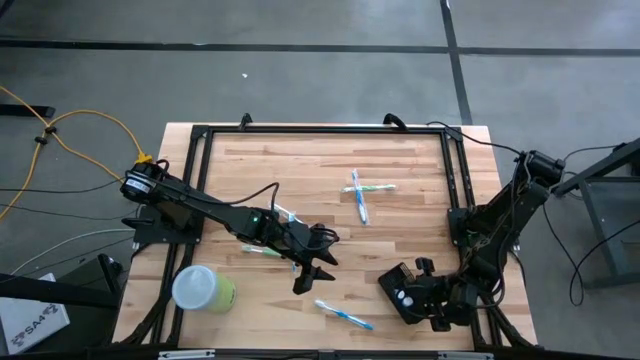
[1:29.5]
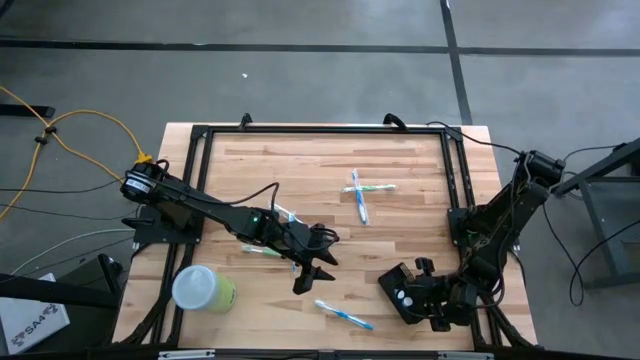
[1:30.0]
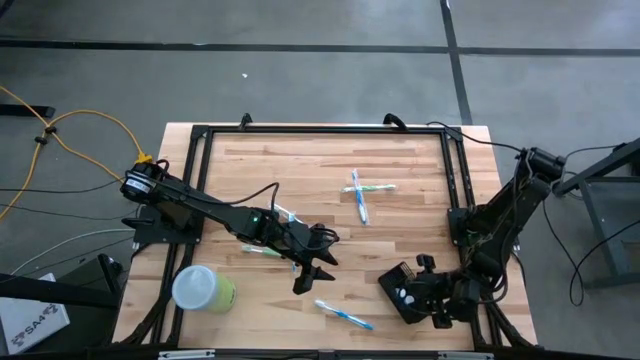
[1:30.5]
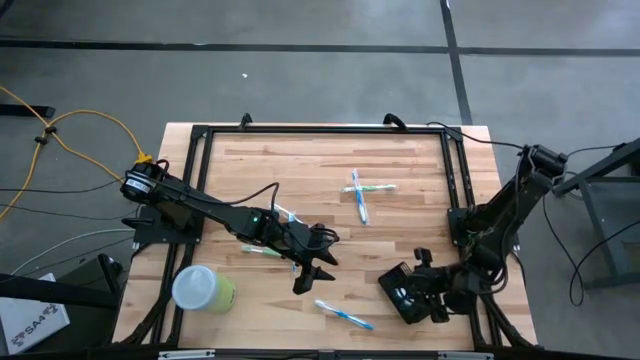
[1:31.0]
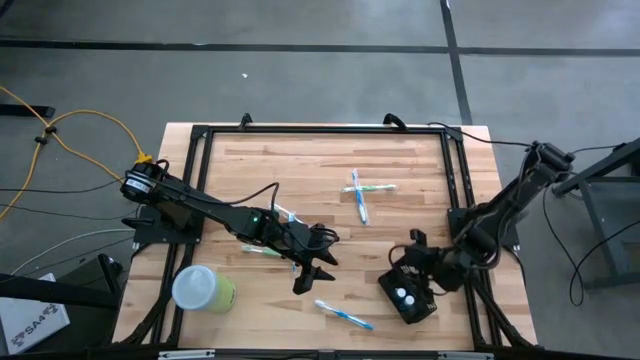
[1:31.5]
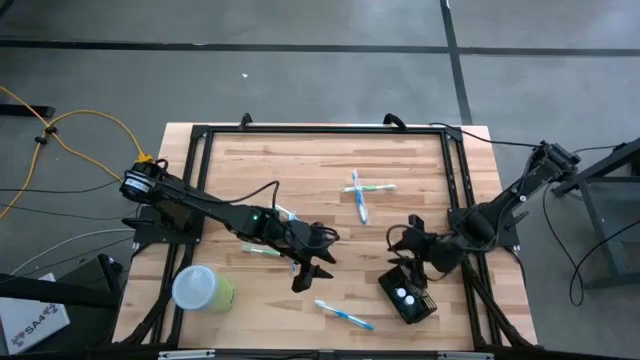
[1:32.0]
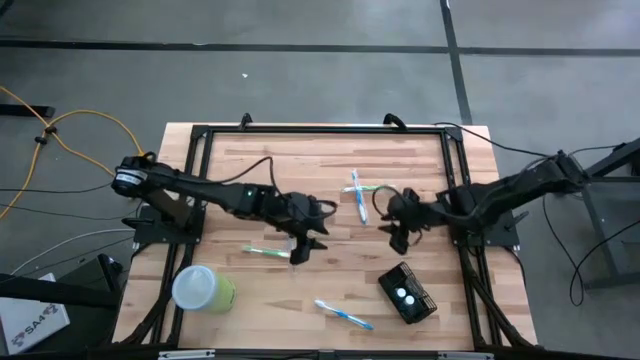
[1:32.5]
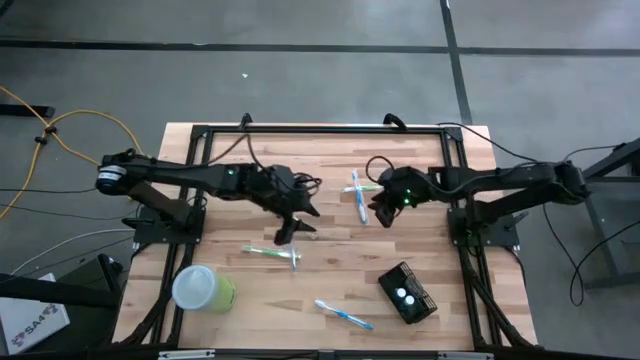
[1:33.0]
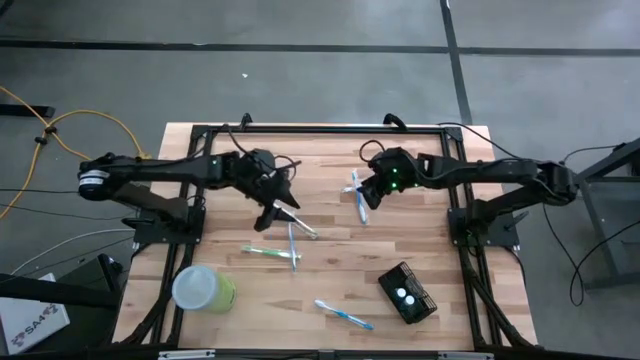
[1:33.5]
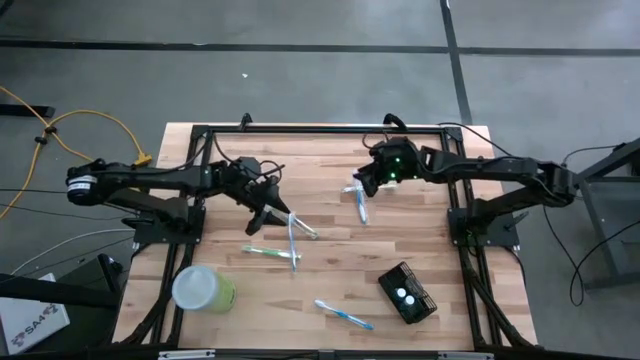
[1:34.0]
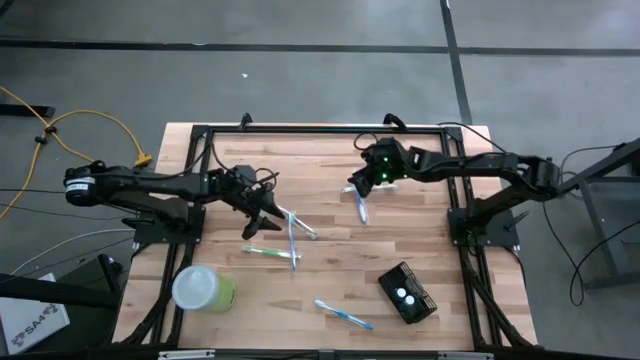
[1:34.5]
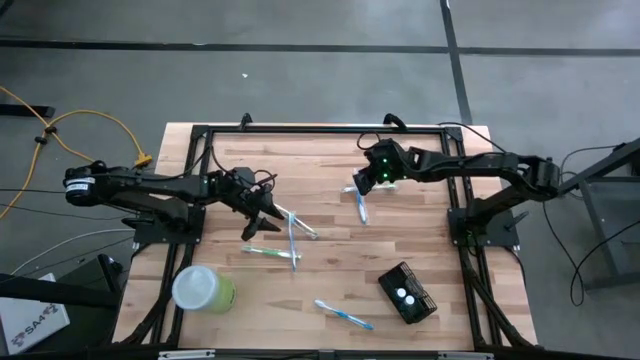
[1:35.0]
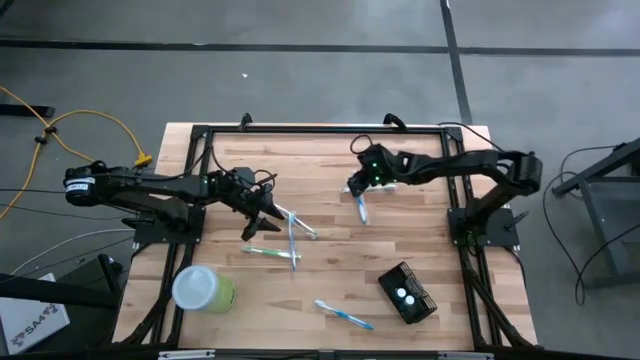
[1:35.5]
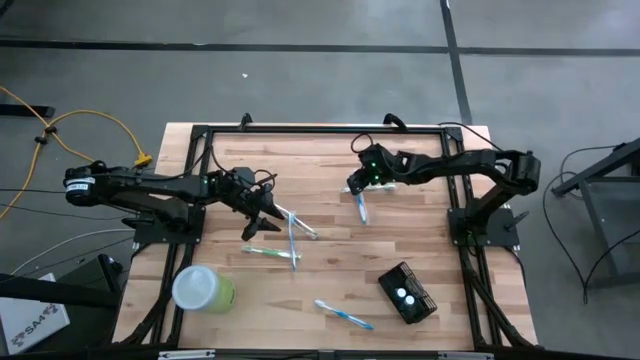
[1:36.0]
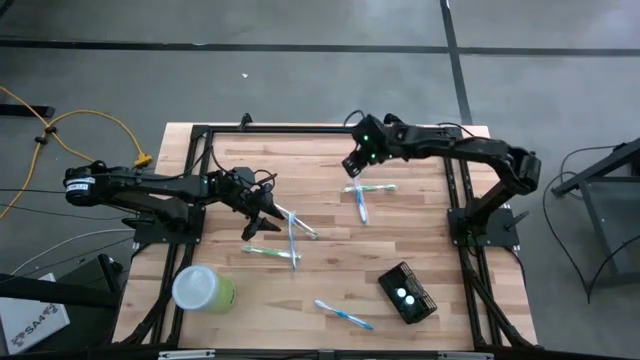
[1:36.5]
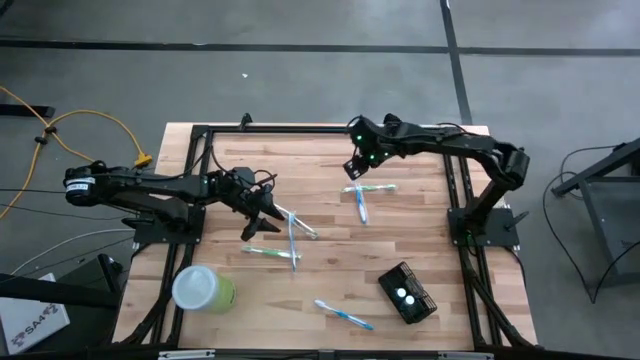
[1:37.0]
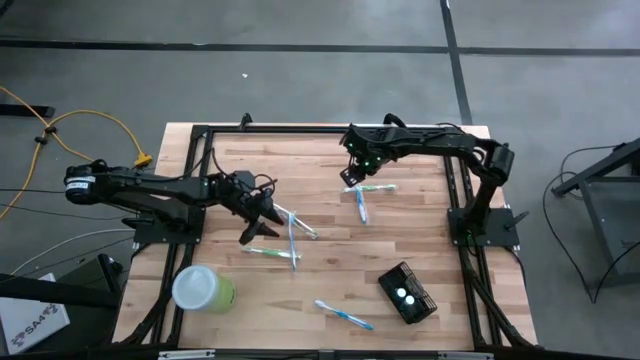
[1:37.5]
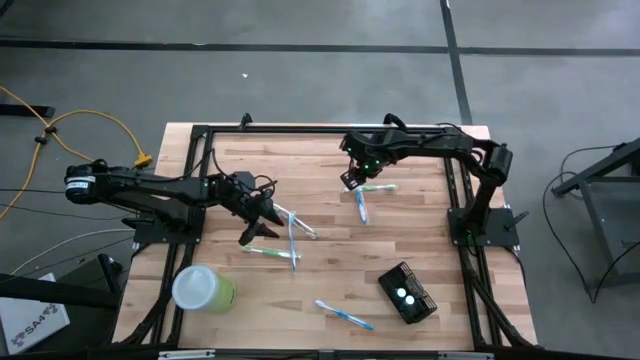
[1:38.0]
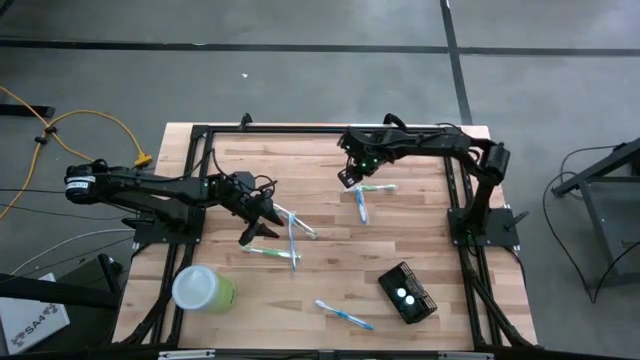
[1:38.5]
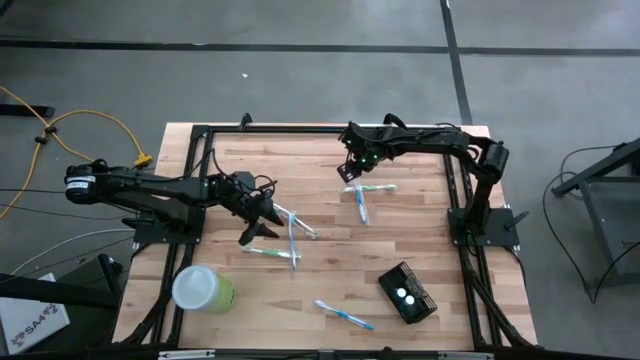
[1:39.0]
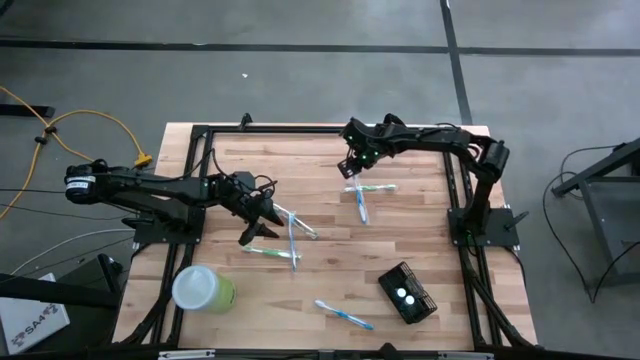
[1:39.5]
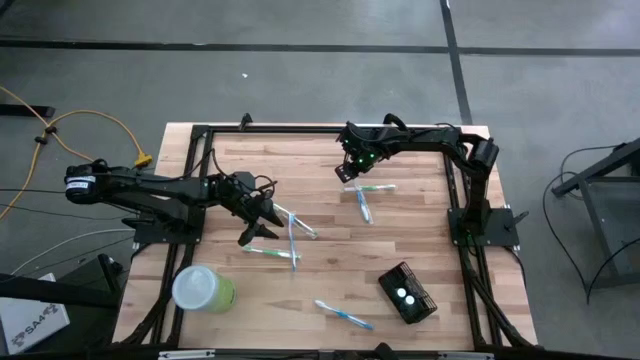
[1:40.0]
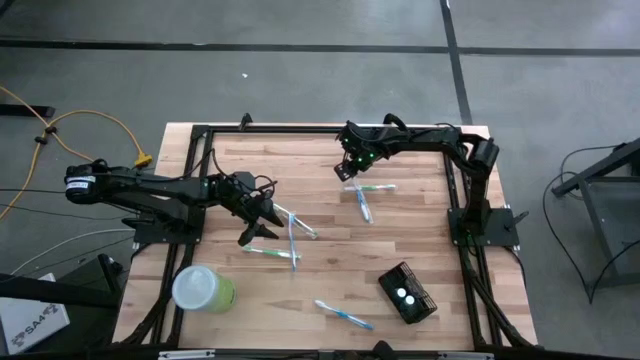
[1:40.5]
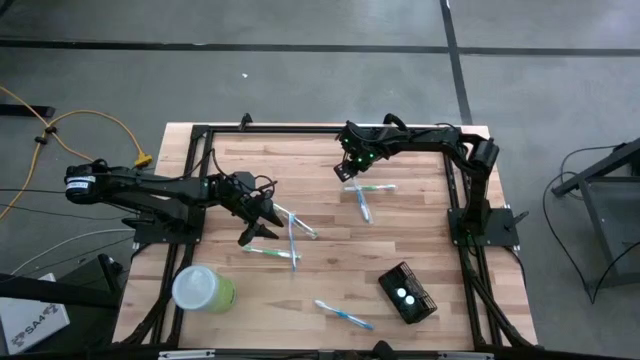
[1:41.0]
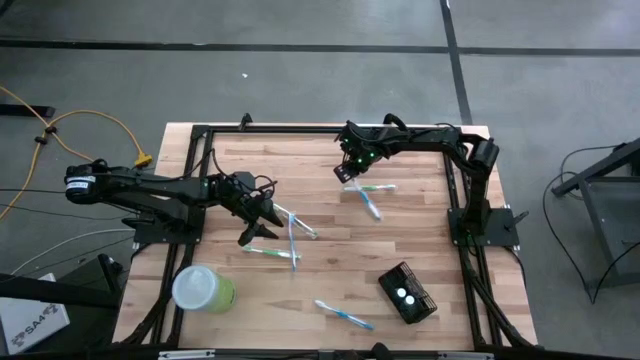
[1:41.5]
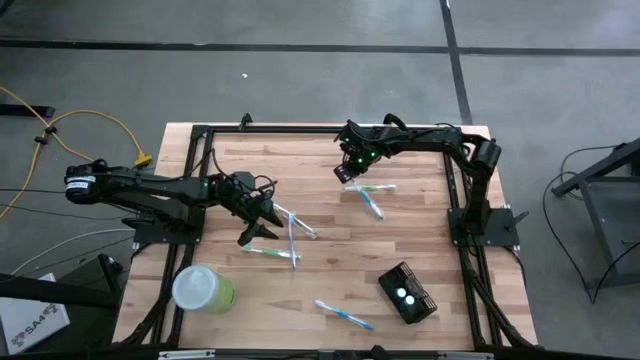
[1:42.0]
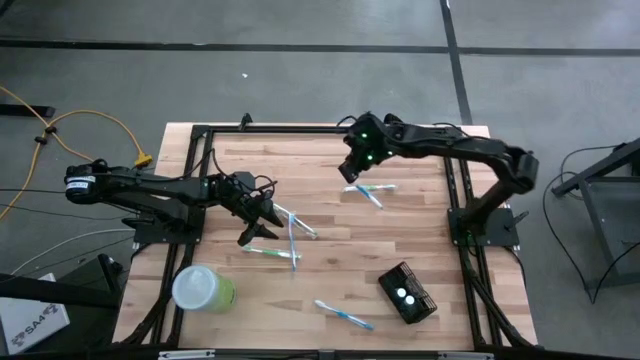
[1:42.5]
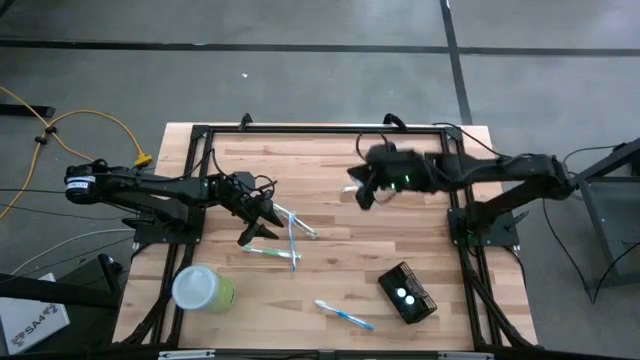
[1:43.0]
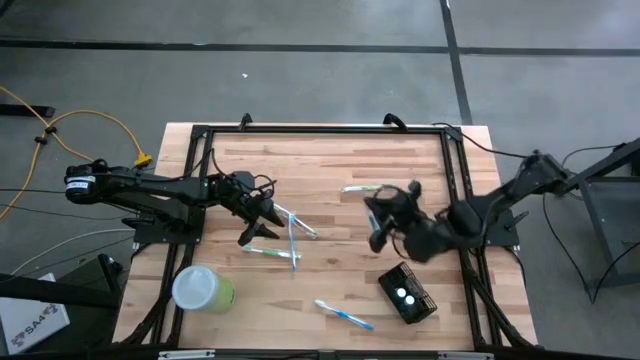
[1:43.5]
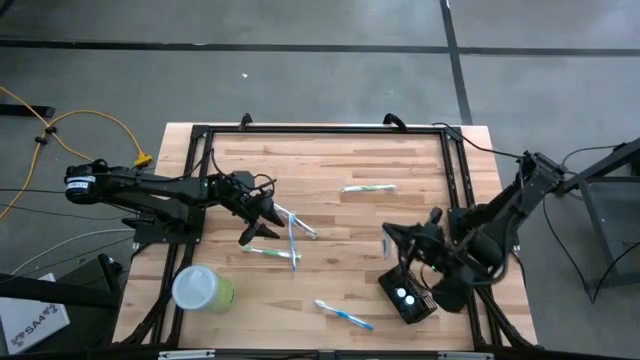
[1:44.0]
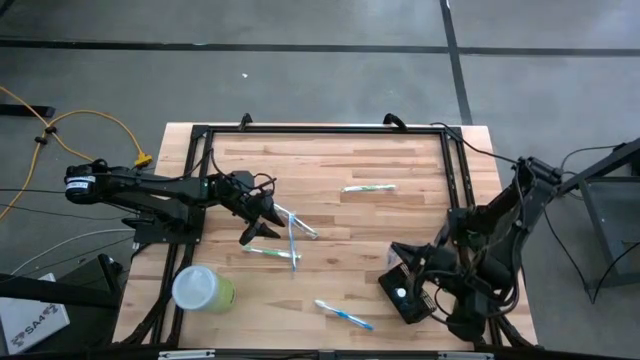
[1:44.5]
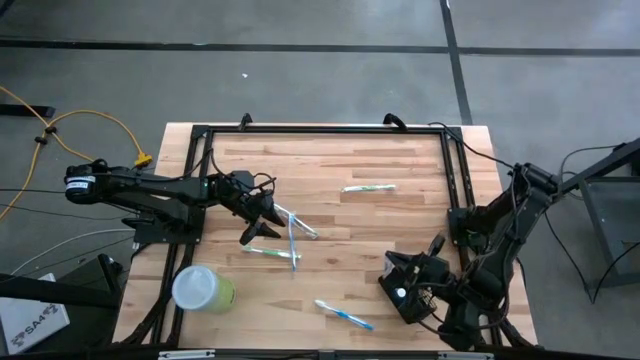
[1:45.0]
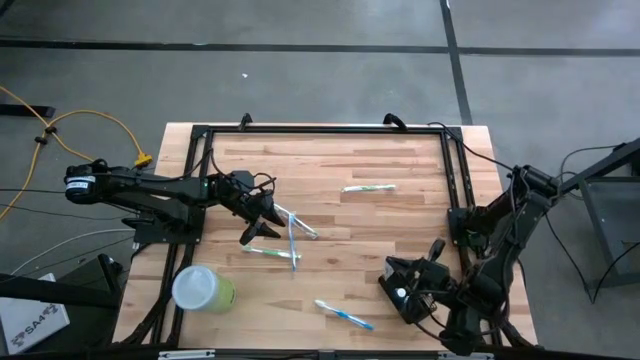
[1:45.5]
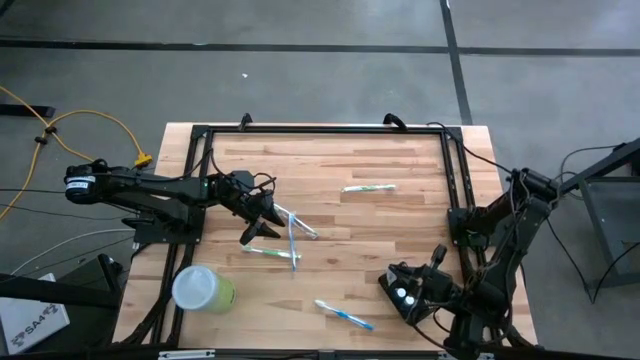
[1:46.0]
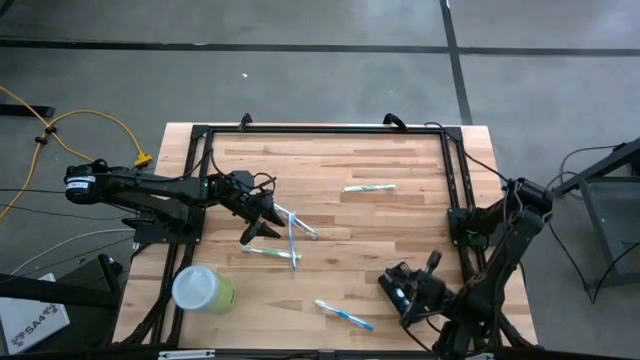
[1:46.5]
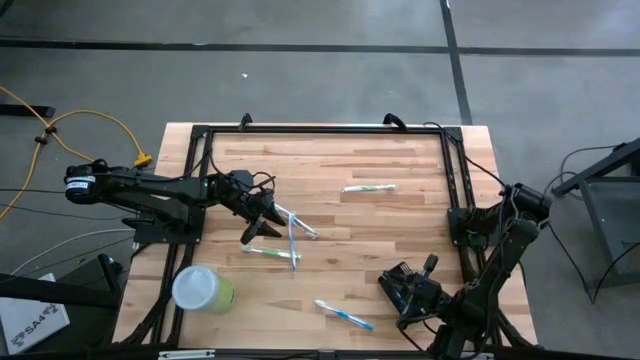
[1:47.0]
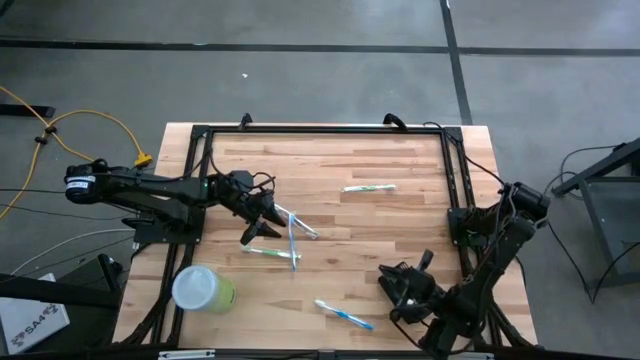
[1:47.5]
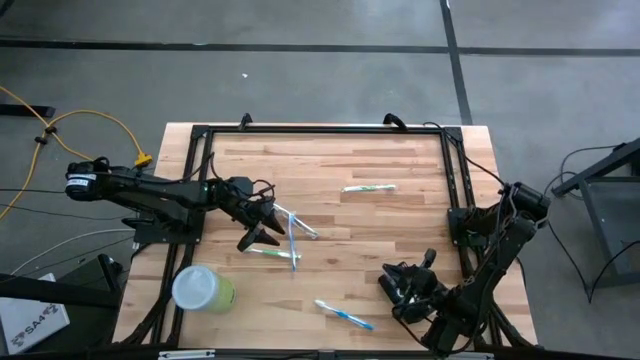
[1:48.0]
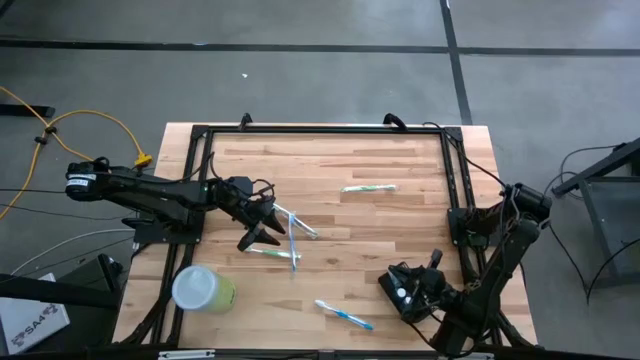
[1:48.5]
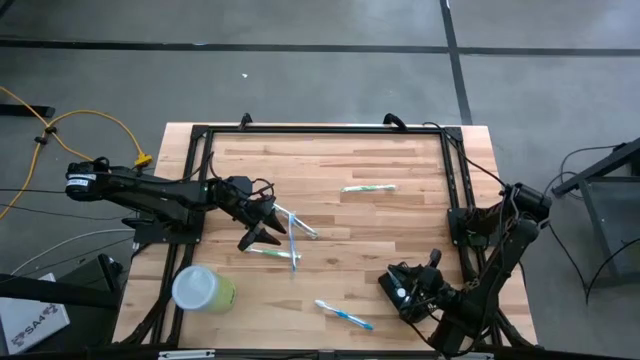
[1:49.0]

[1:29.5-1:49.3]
Task: Pick & Place toothbrushing station
Put the top blue toothbrush into the top section of the black wire organizer
